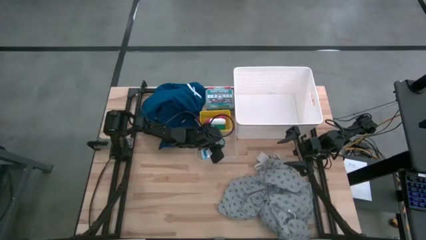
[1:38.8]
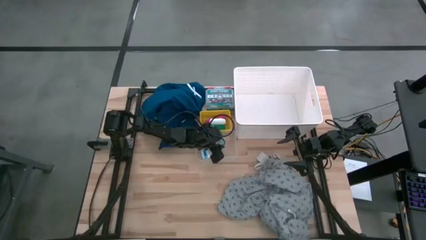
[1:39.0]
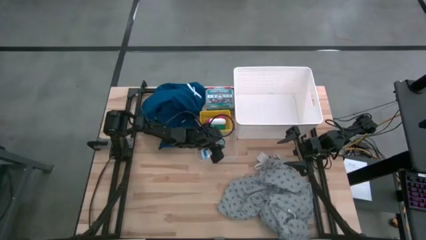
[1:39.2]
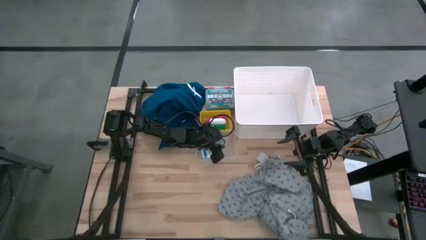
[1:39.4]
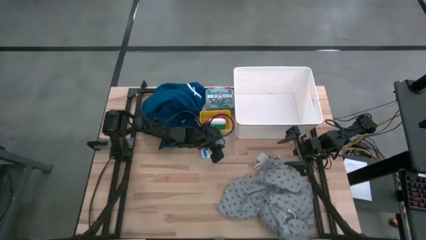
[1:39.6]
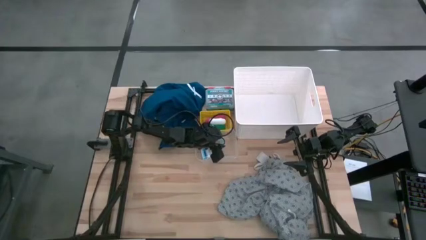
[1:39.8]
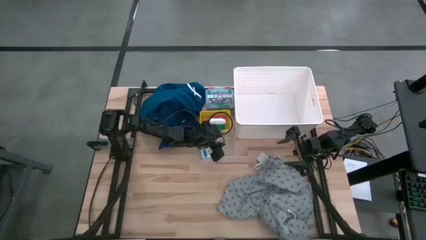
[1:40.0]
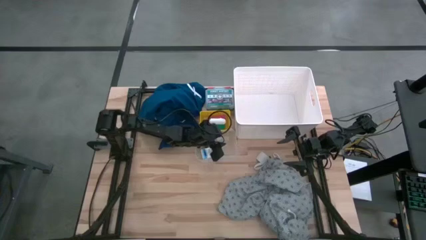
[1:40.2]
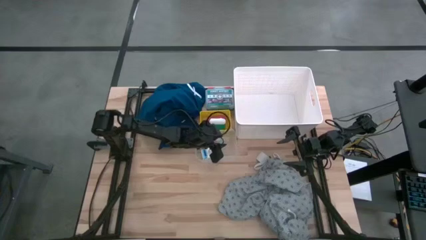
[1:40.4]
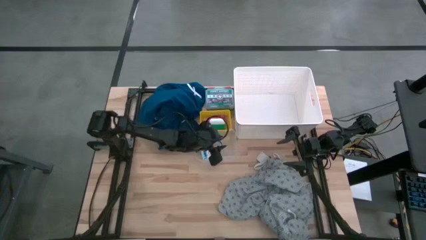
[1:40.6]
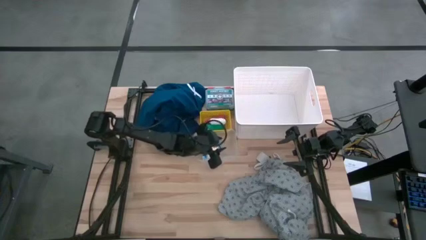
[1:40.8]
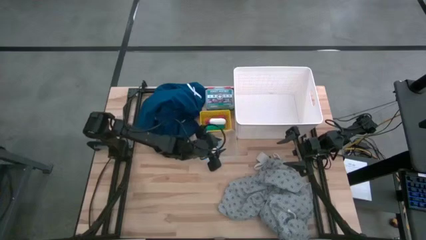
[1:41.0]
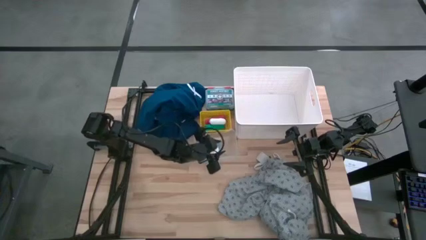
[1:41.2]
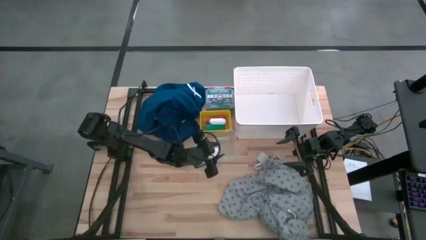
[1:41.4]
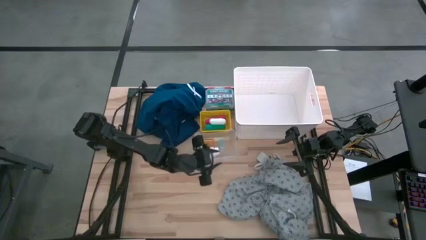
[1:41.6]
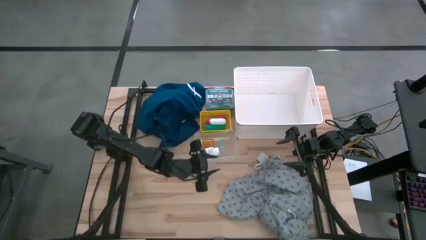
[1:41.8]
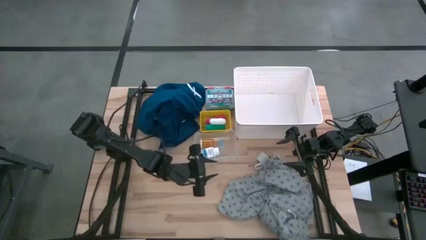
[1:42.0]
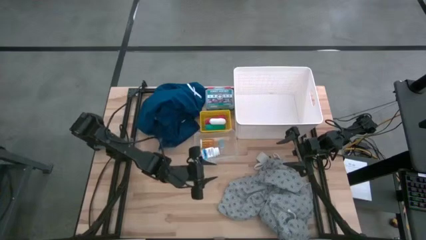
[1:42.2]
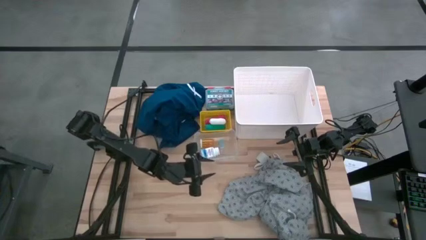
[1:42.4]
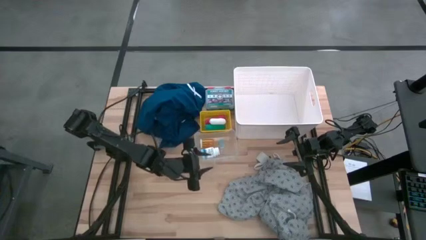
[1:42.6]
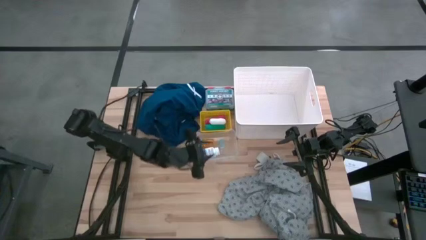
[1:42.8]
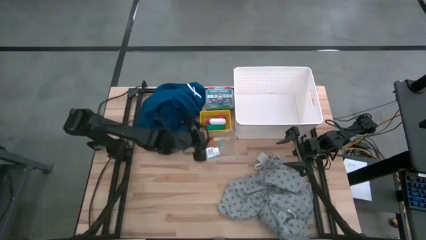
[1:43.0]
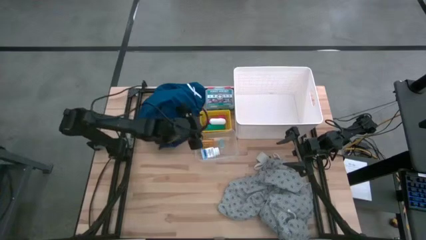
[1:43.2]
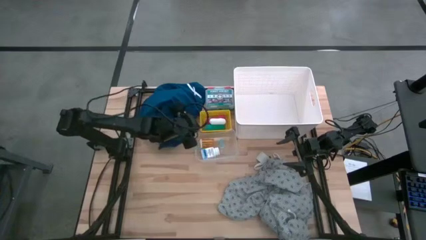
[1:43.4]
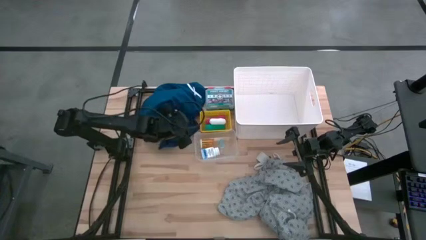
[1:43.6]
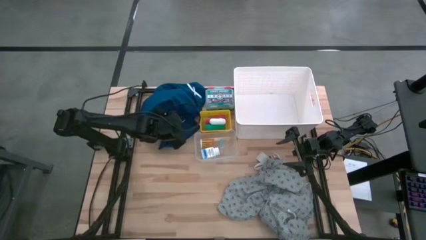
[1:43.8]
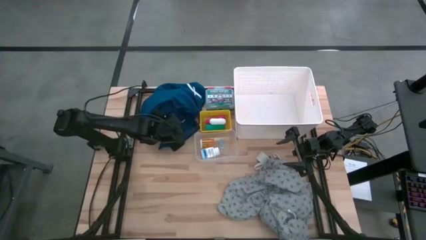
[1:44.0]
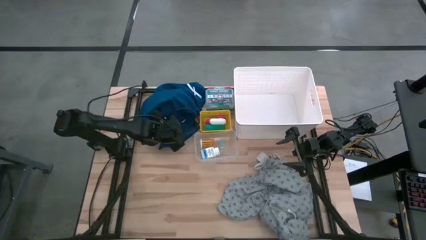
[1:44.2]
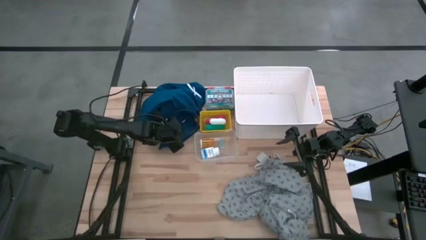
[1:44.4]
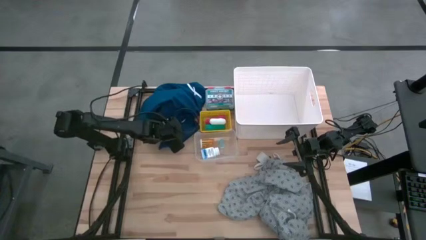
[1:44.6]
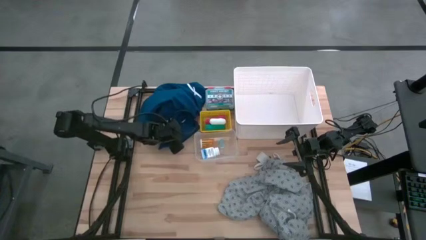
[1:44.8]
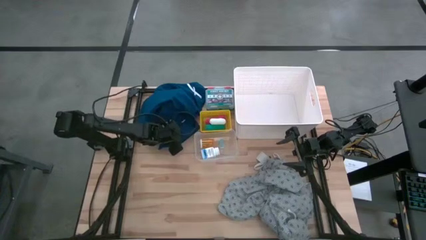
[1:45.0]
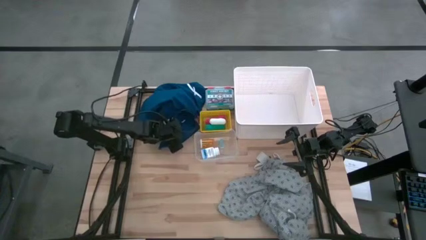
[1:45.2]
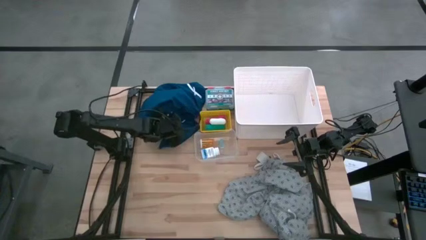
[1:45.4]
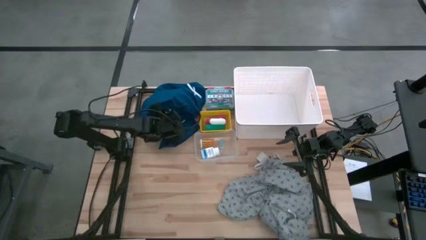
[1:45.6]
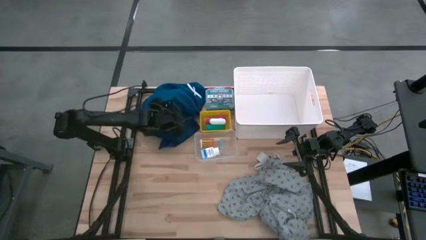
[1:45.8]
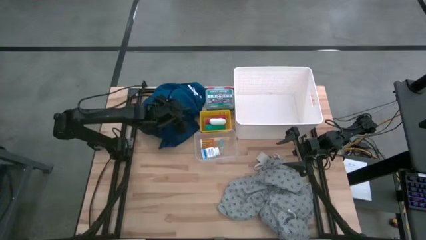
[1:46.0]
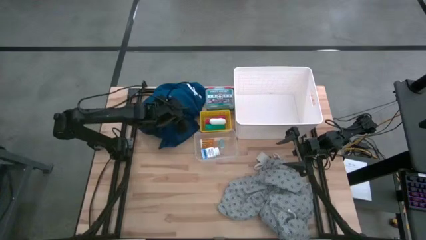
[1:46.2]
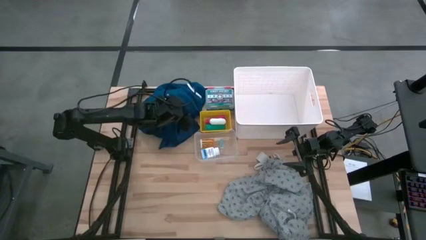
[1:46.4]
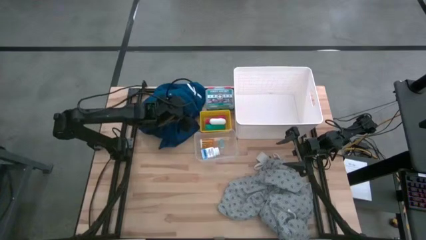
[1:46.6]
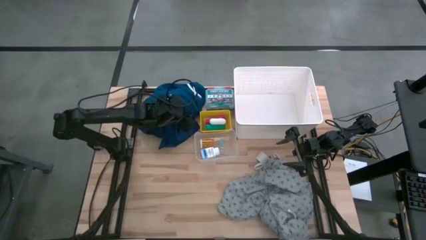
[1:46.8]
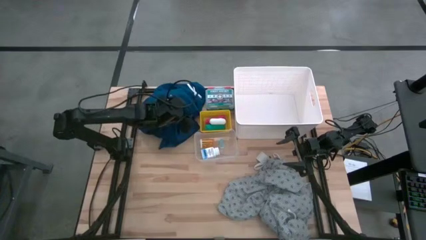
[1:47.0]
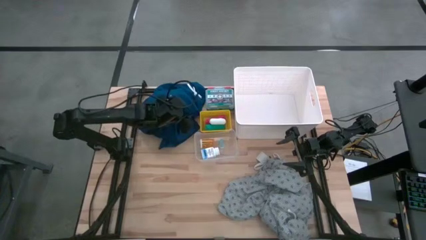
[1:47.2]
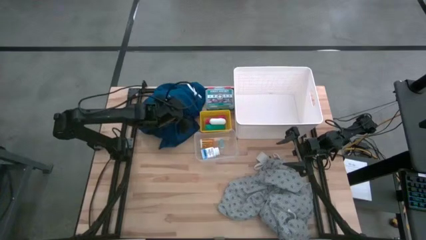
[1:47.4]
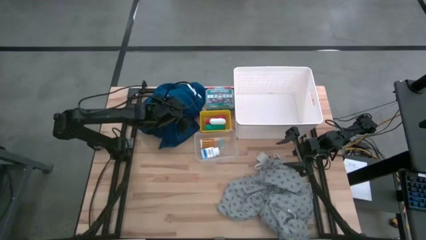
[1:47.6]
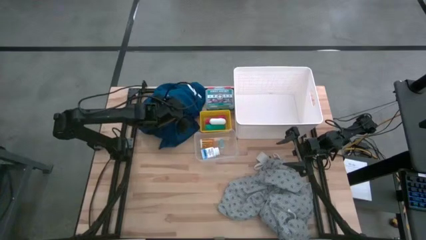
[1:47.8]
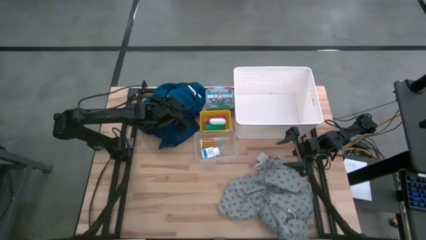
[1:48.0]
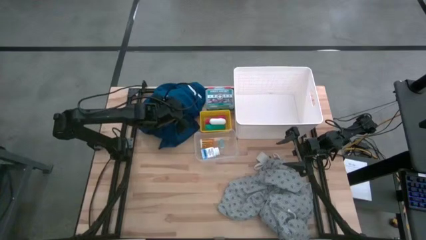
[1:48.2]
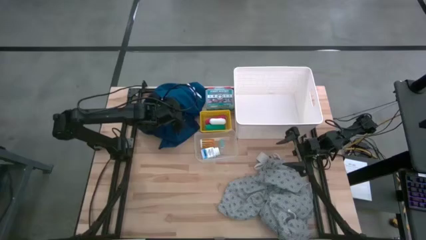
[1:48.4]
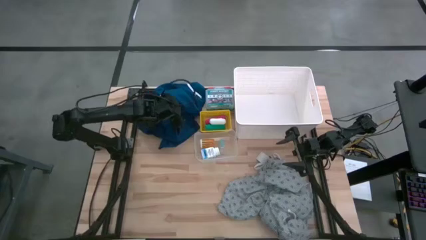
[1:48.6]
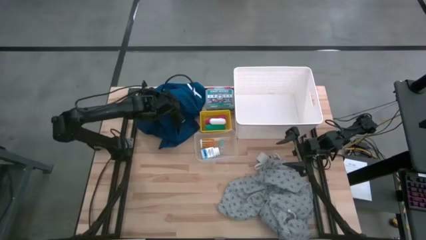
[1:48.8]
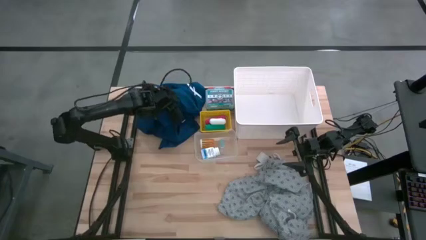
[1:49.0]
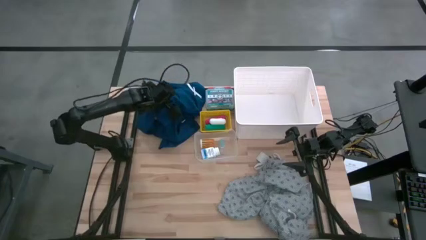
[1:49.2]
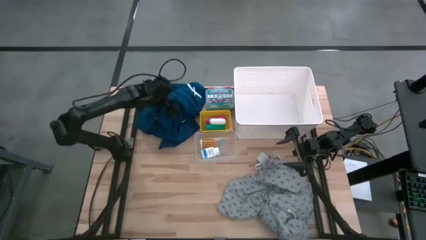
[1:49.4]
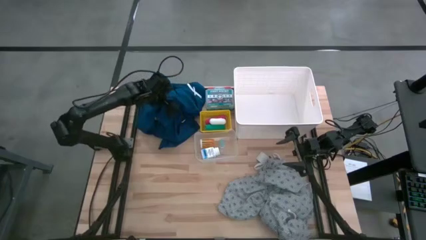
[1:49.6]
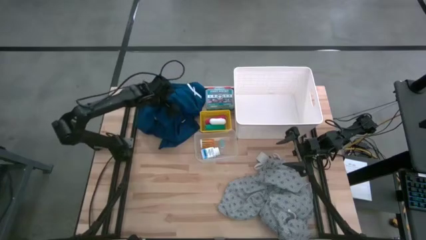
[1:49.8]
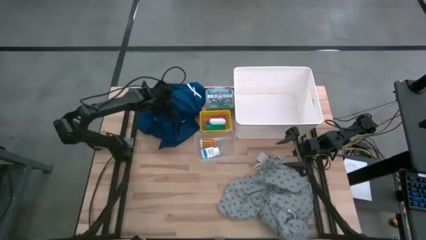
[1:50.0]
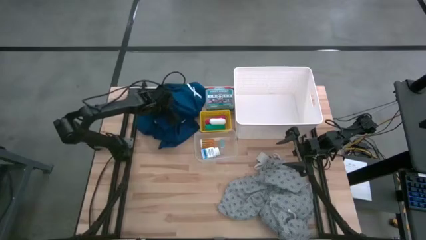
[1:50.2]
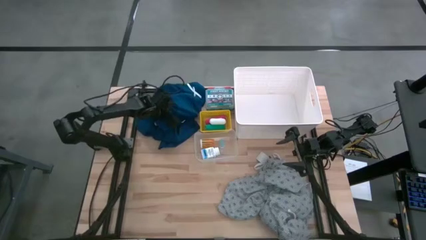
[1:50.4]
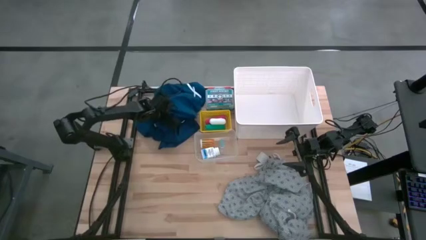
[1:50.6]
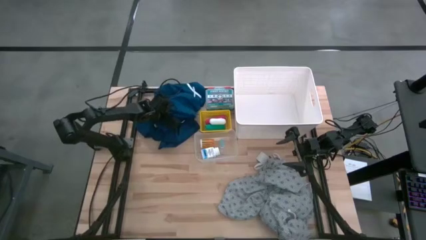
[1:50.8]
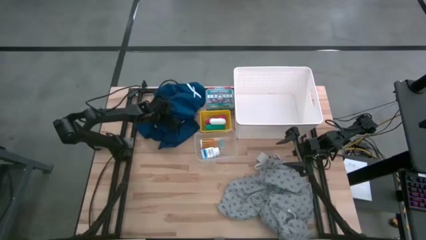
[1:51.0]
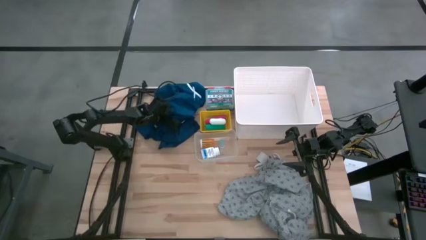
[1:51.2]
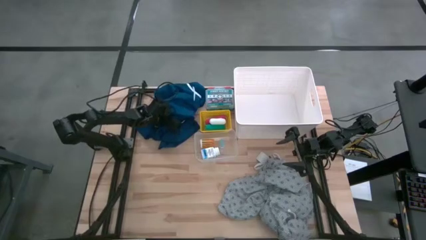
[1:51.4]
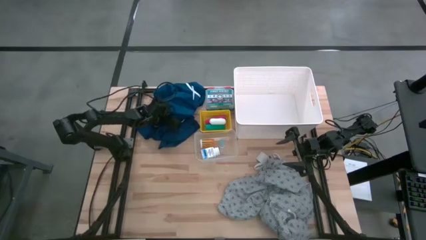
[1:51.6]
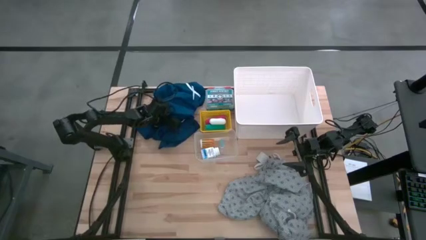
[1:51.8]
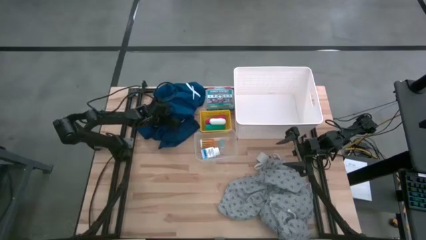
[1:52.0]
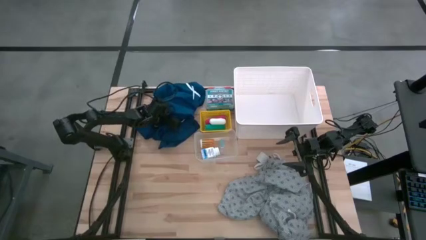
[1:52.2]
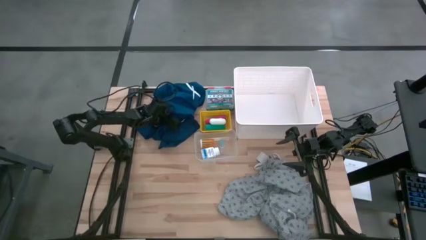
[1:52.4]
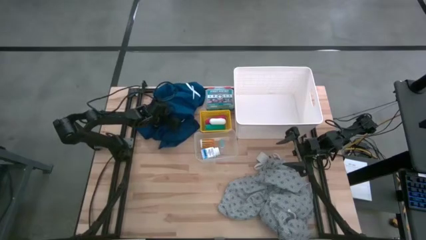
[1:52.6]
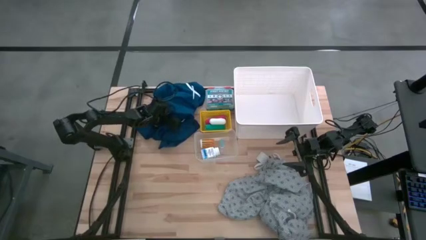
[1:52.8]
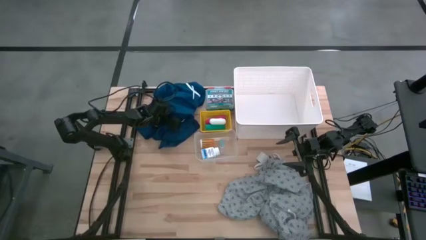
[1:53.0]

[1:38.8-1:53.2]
Task: Pick & Place Medicine items
Put the blue patient gown into the white bin
